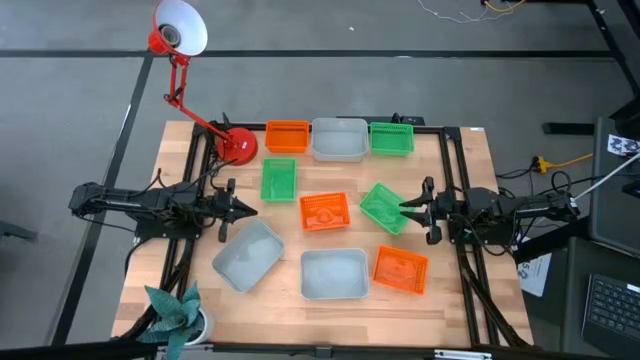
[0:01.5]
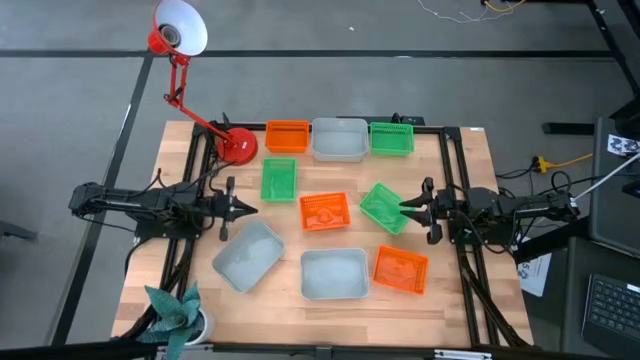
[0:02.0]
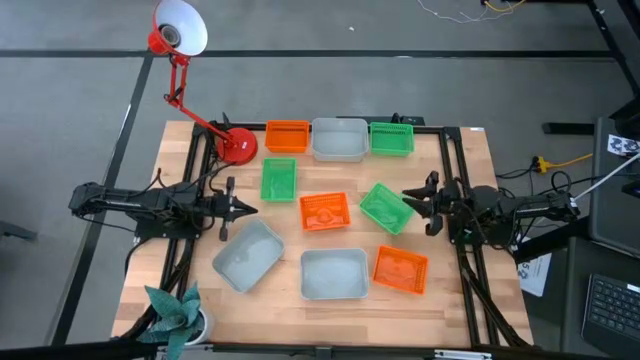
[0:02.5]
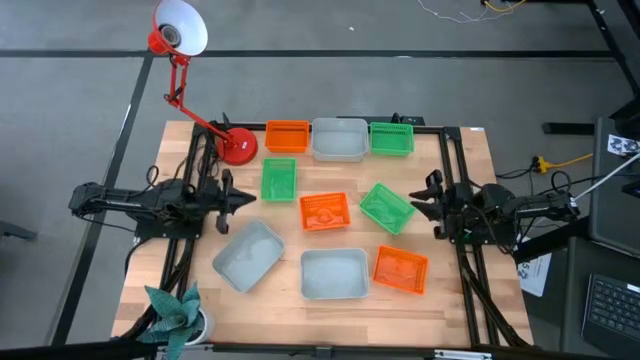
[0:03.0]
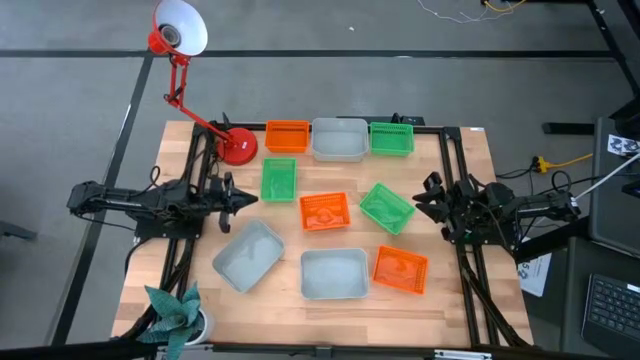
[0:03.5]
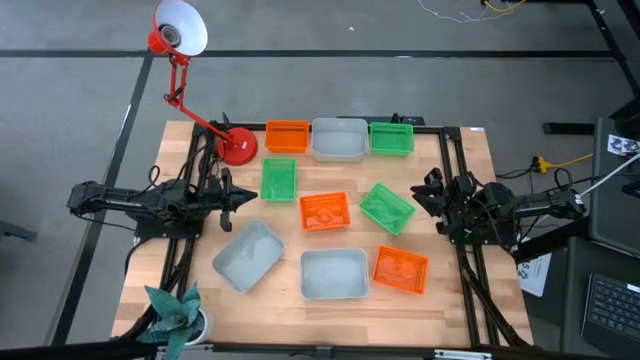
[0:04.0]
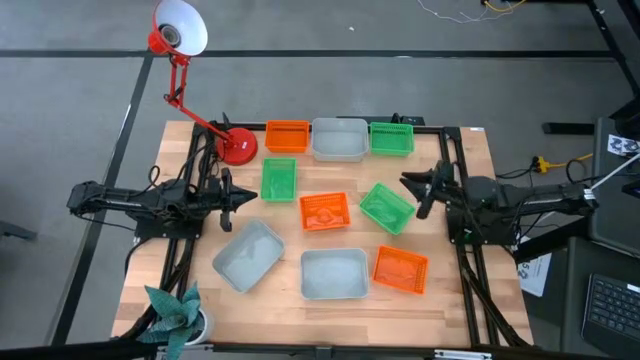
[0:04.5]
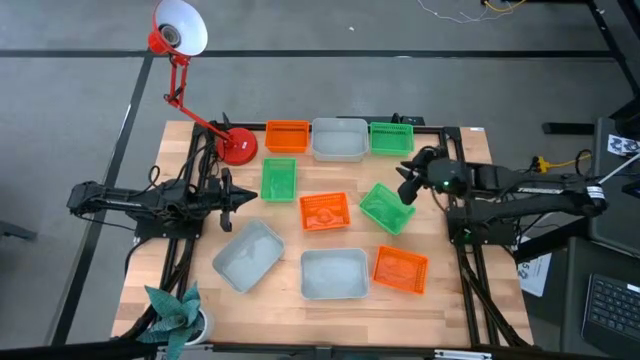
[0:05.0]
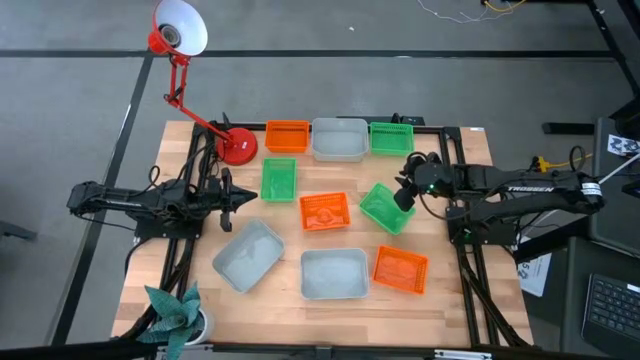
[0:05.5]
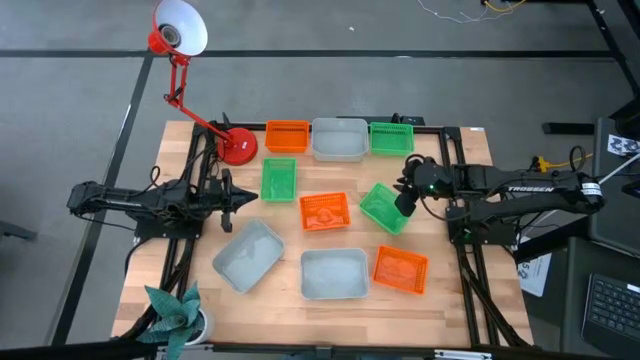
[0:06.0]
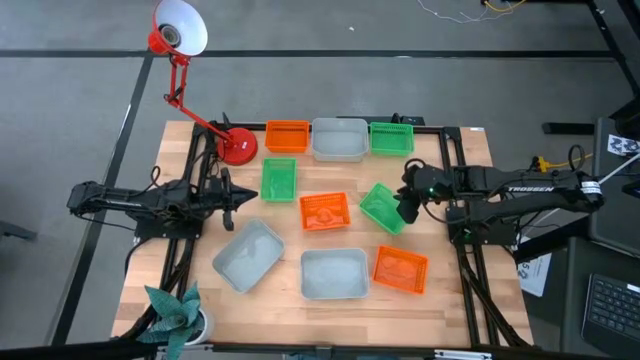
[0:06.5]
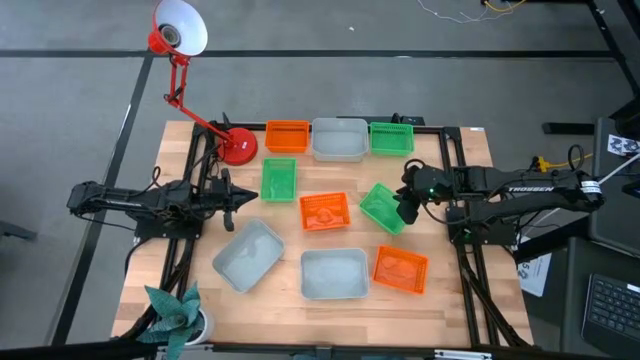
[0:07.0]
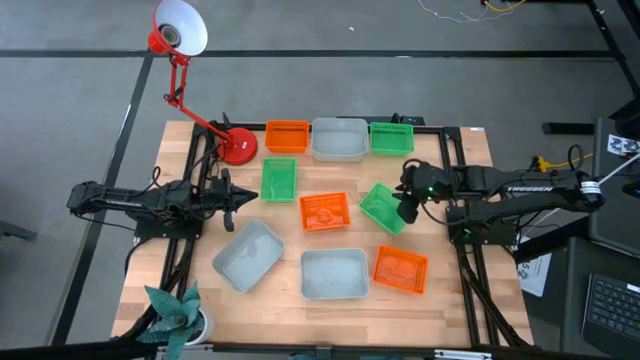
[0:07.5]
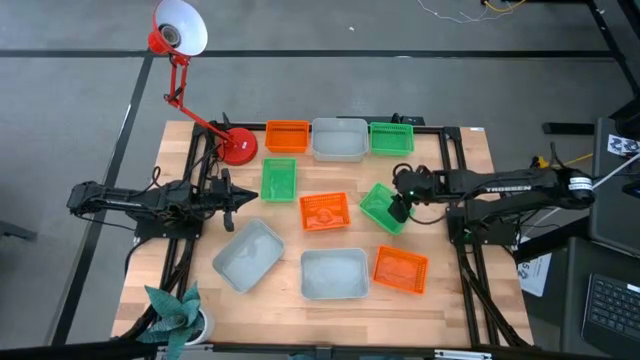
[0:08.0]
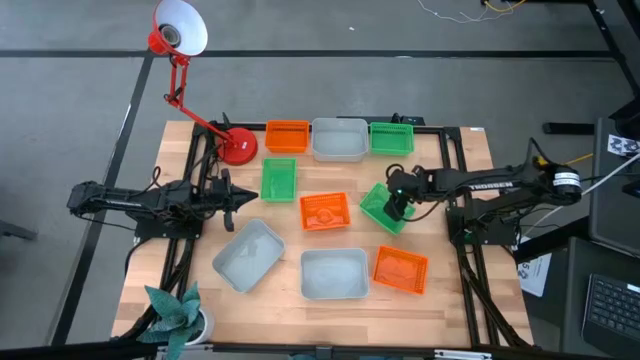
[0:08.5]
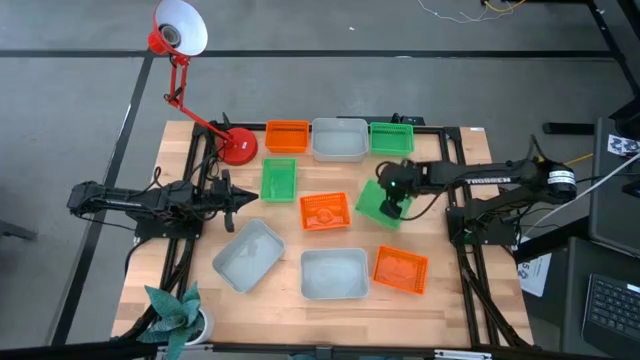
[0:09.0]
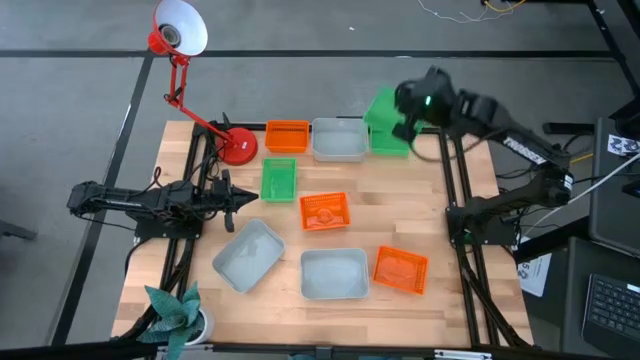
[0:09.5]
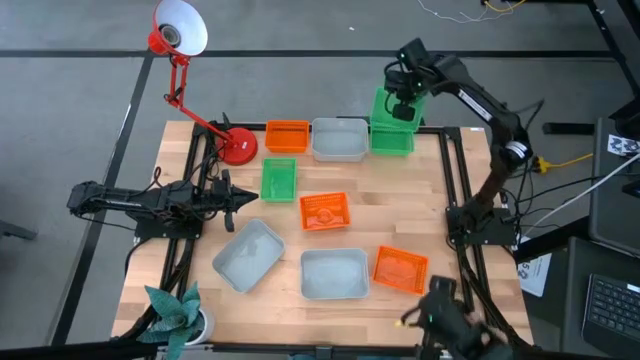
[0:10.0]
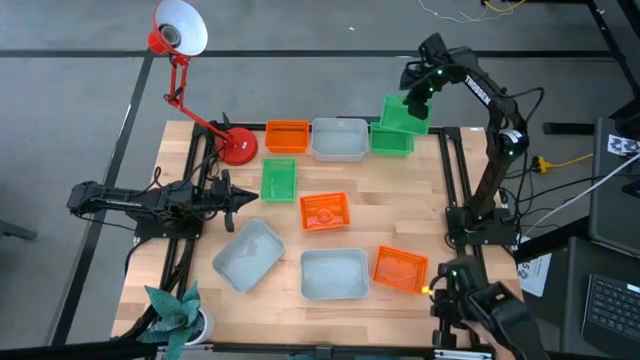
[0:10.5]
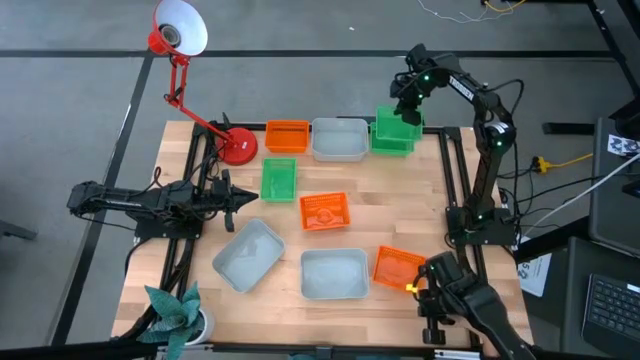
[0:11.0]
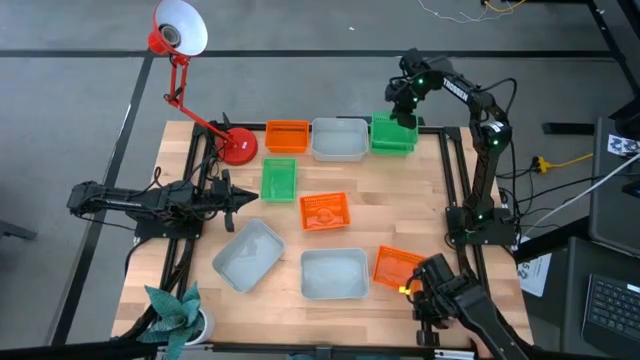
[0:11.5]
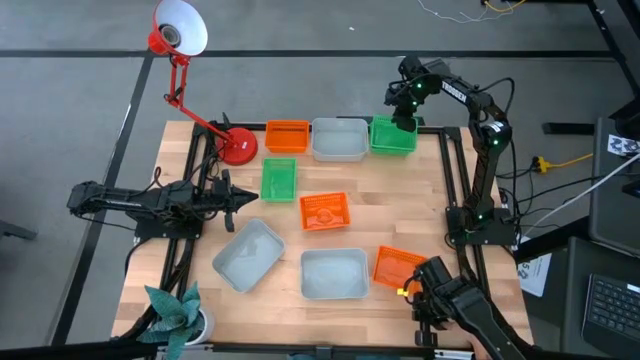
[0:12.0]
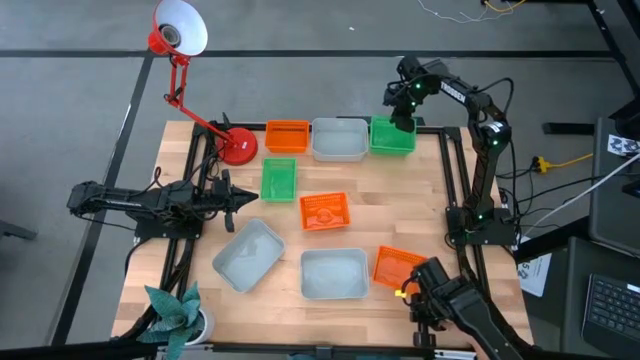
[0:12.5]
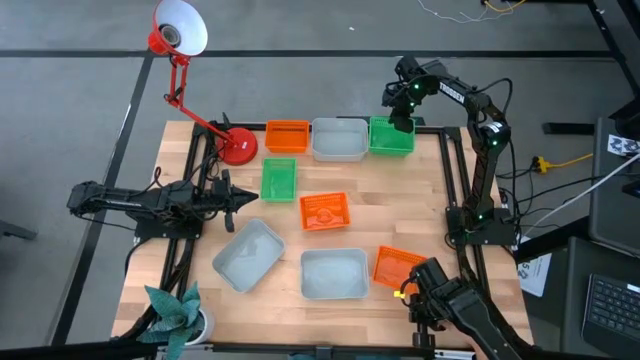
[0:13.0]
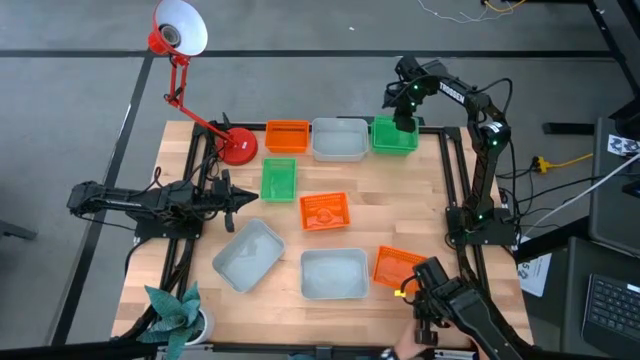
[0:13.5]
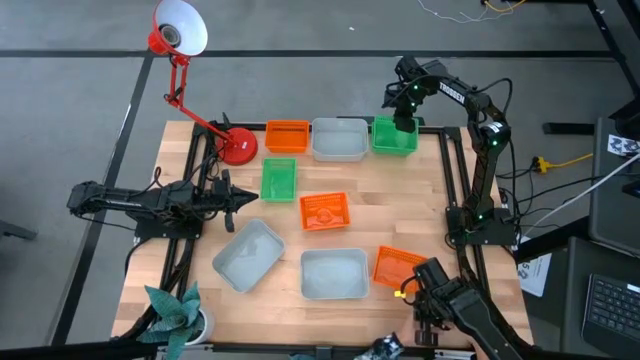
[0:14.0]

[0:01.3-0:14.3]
Stack the bottom green bin on the top green bin
